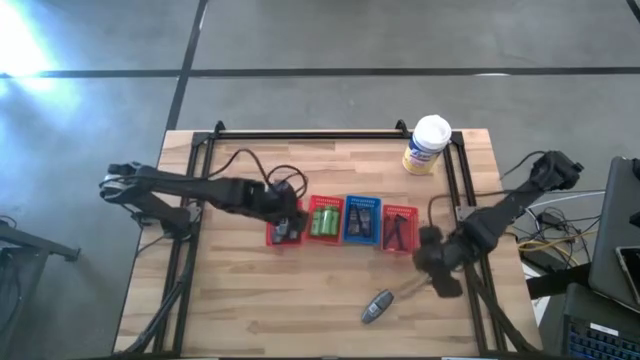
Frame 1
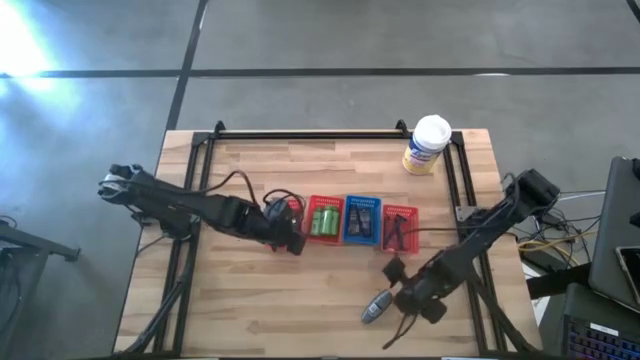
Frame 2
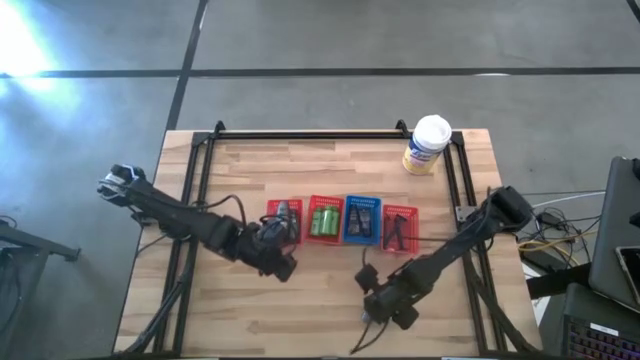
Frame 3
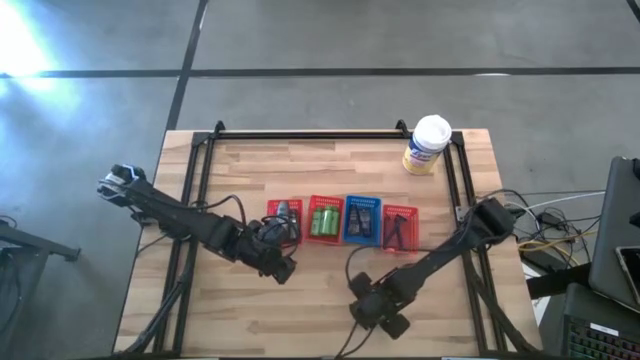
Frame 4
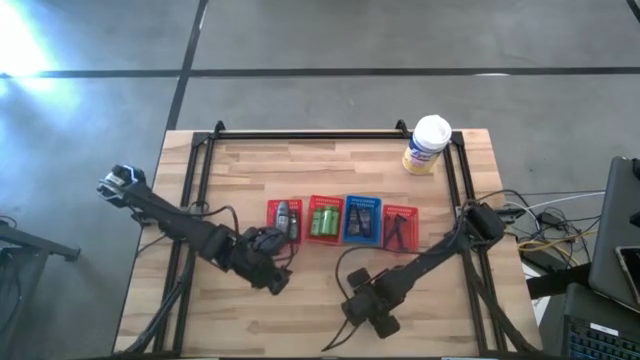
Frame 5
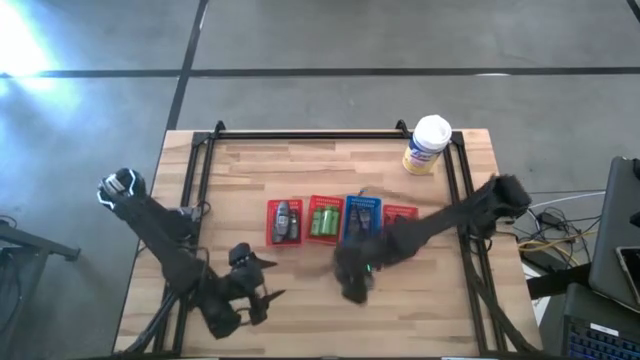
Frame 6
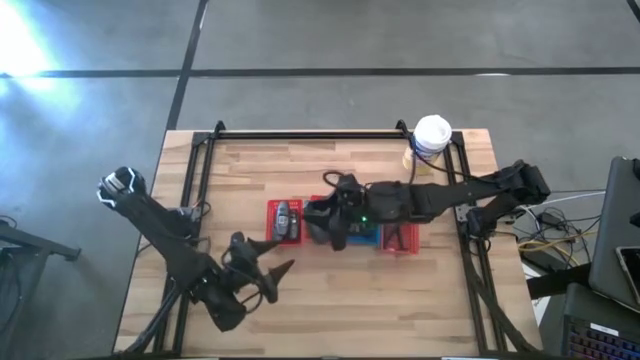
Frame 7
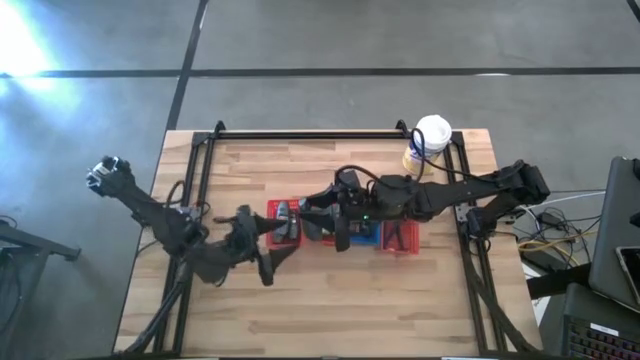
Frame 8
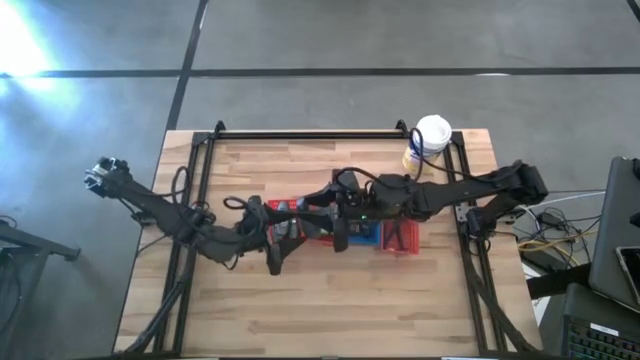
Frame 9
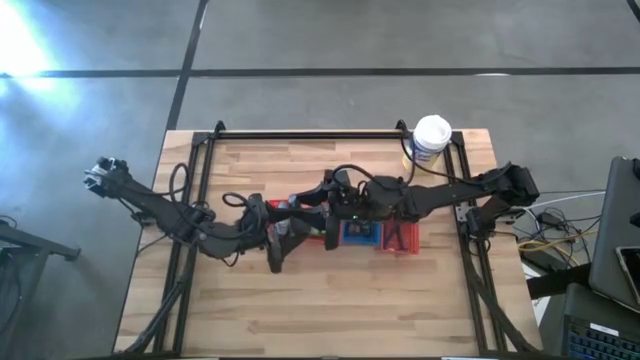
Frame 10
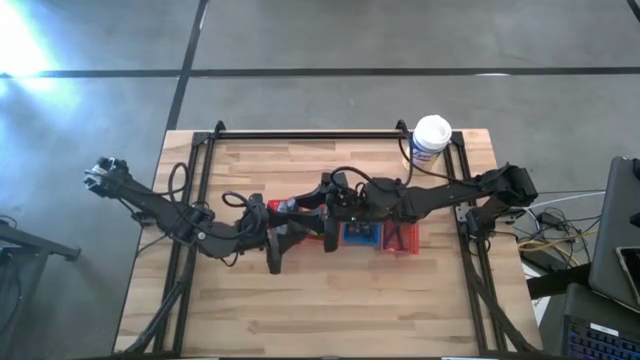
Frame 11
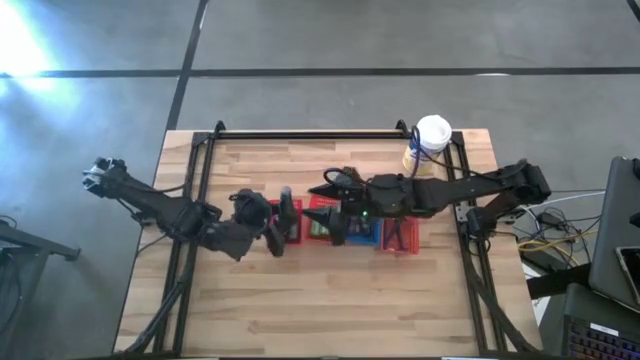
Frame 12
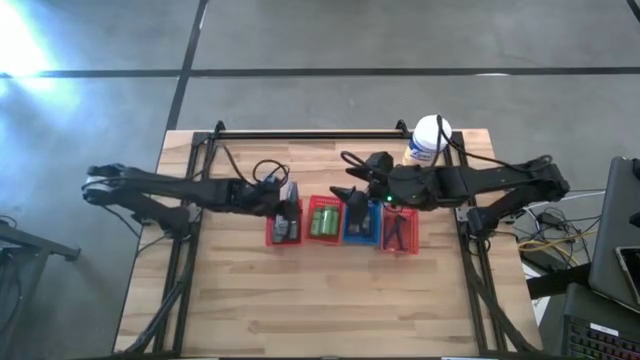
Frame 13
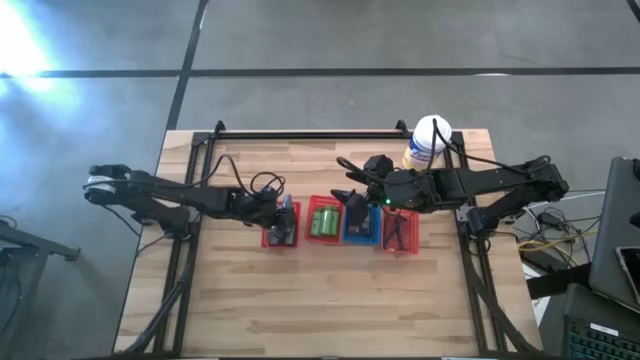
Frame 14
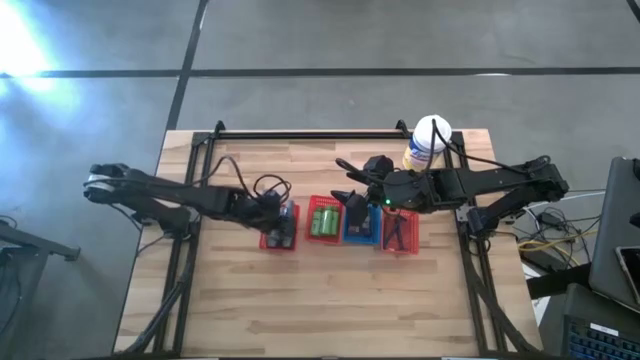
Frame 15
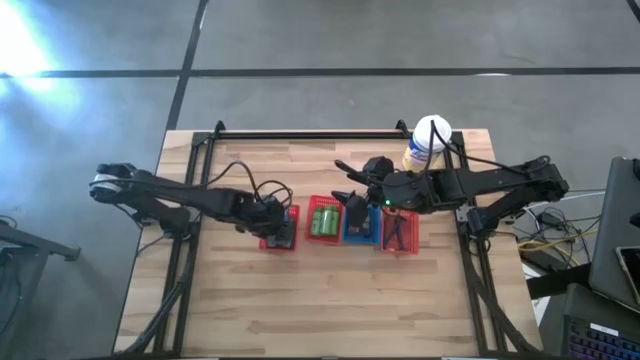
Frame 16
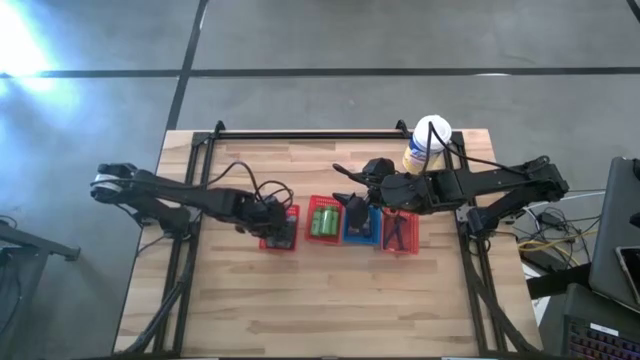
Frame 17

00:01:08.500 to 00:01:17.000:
Task: Pick & Place Travel size toiletries
Put the gray deodorant into the left orange basket

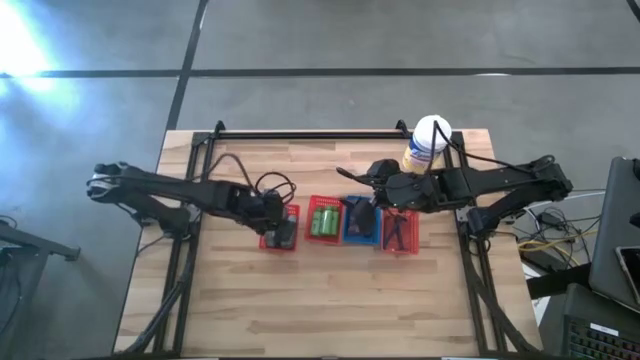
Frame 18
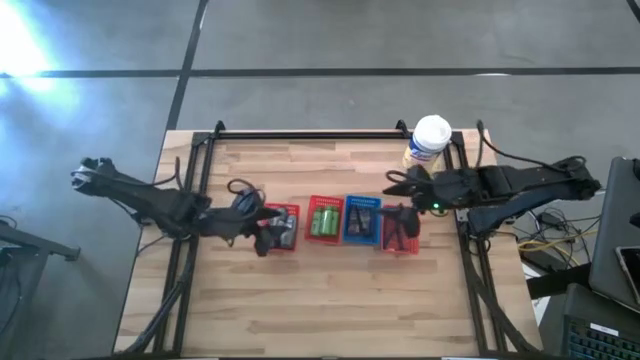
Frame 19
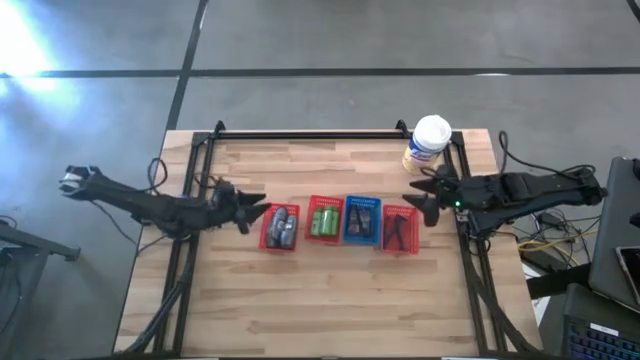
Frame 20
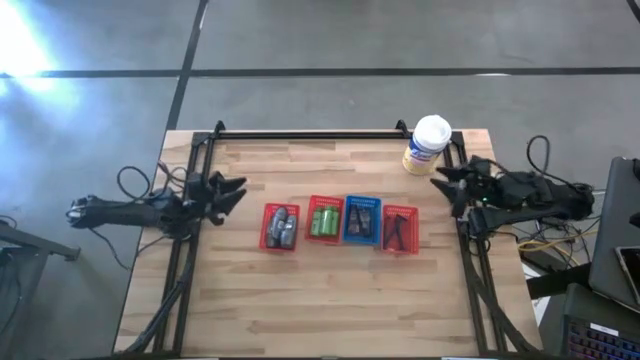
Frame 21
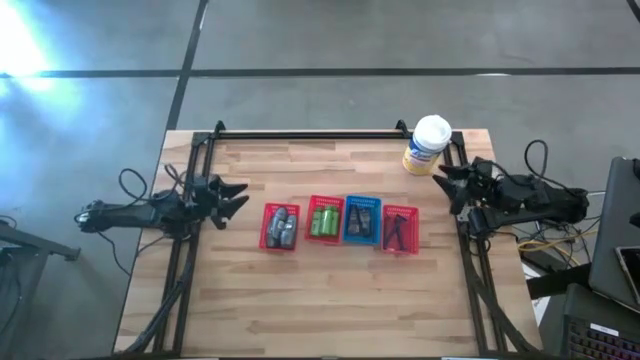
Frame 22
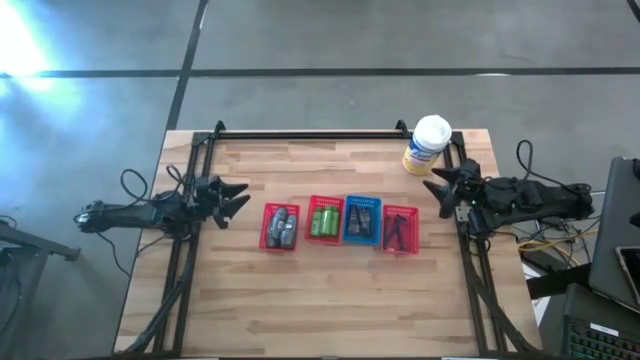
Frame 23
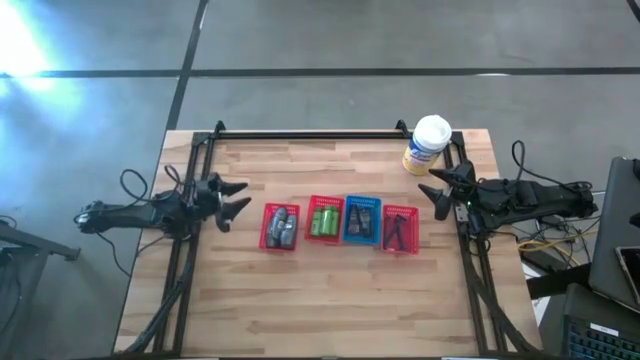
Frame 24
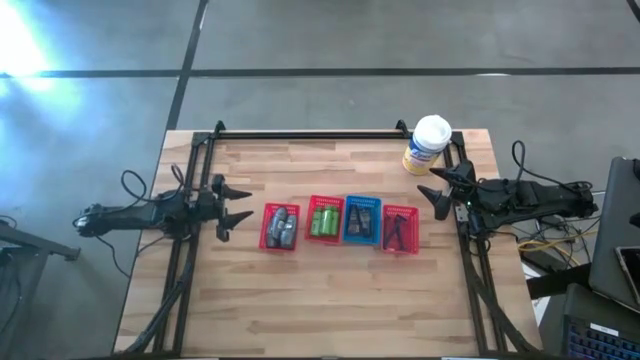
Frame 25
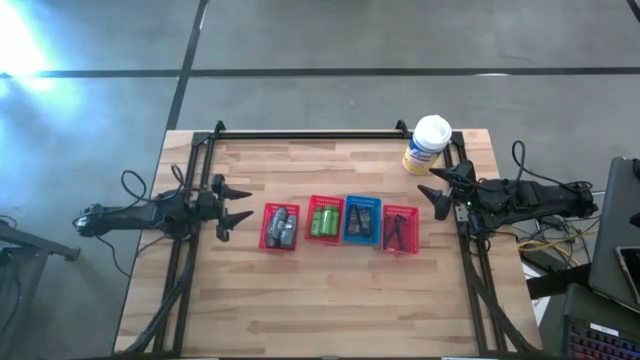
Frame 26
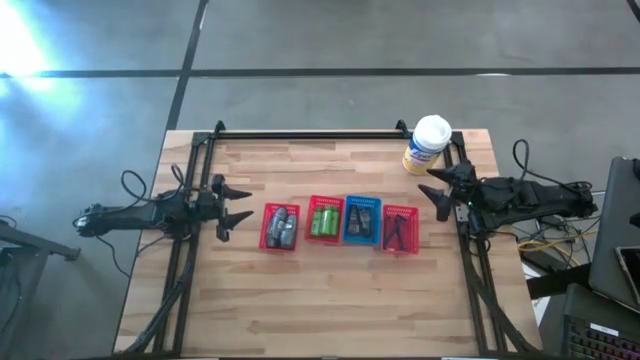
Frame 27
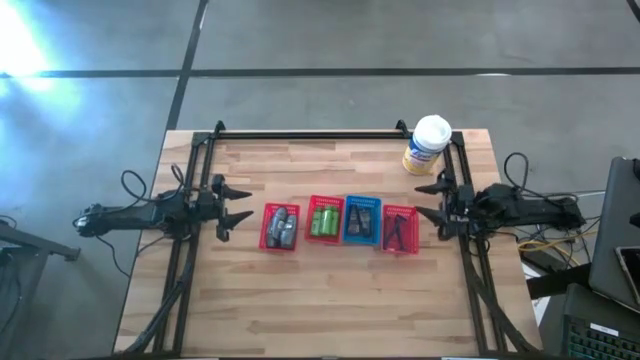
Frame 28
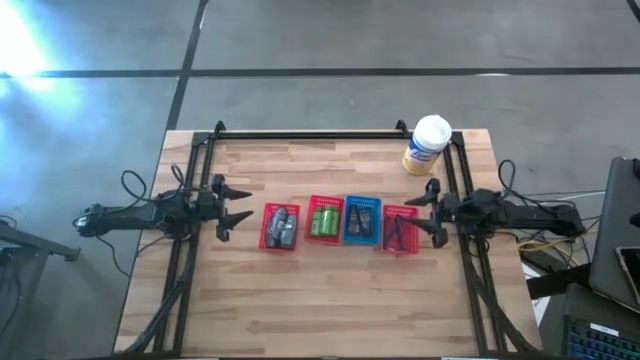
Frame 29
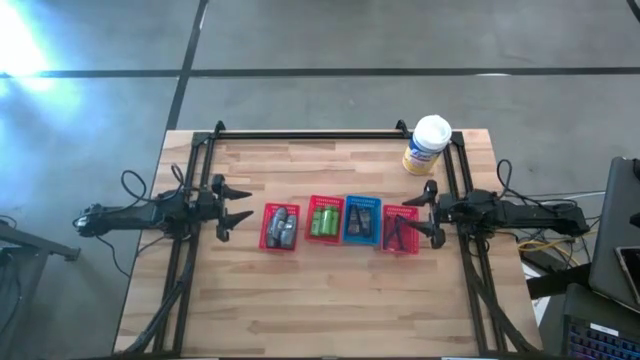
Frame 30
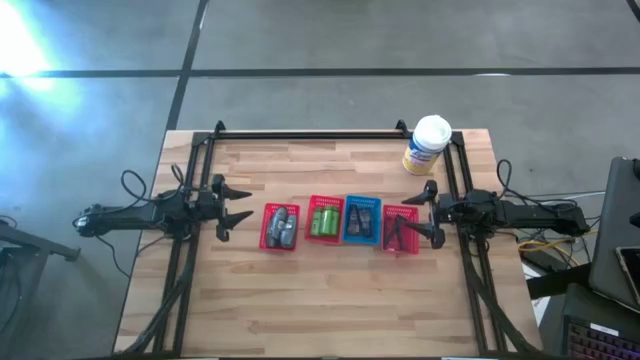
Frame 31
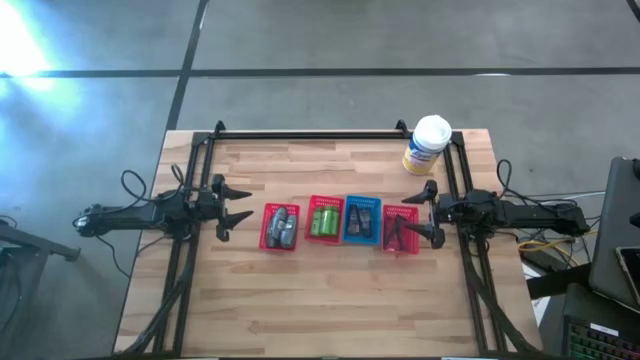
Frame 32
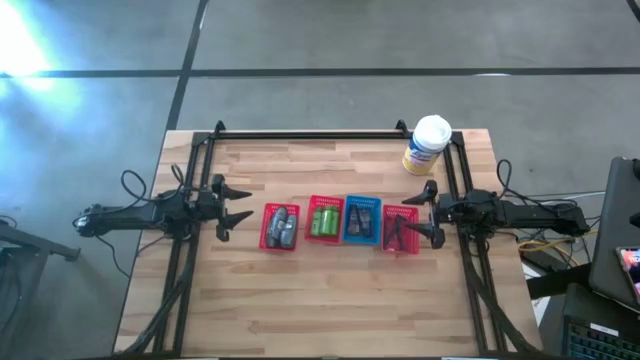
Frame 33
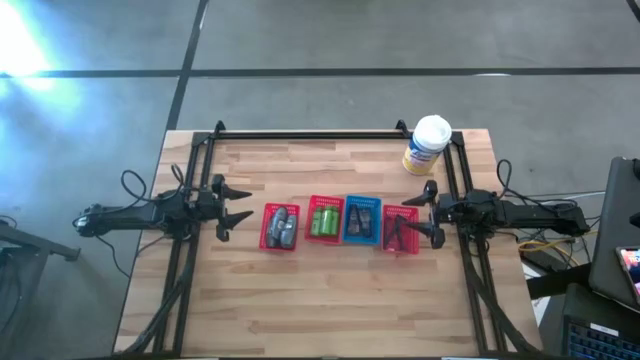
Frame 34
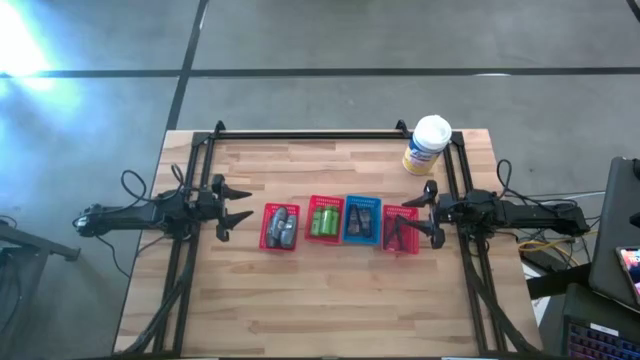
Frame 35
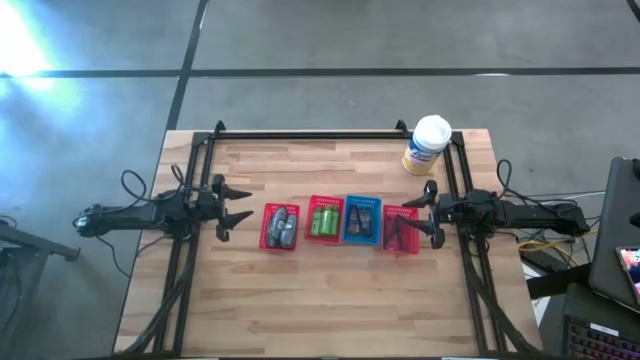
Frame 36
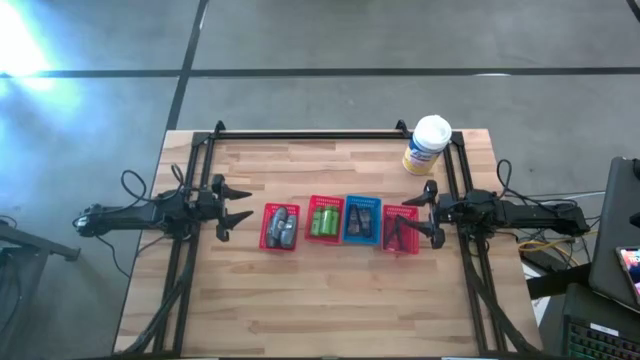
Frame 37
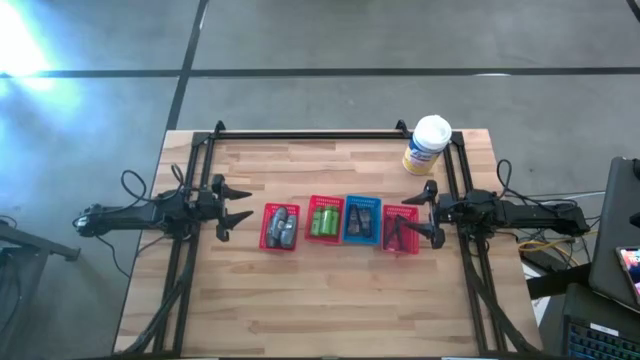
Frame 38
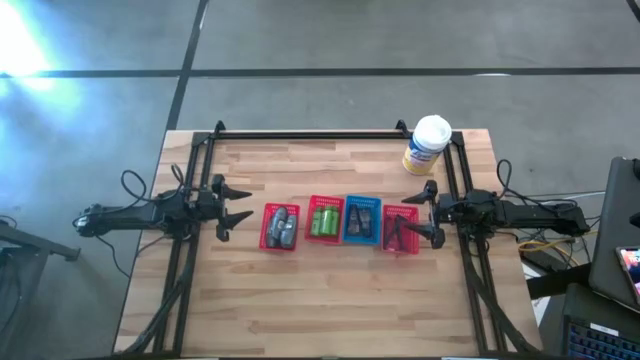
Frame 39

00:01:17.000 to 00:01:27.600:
Return to Home Position

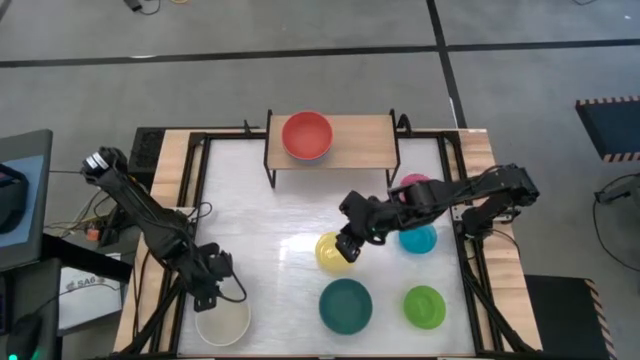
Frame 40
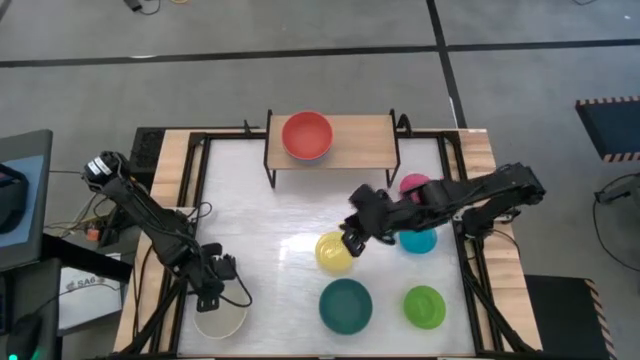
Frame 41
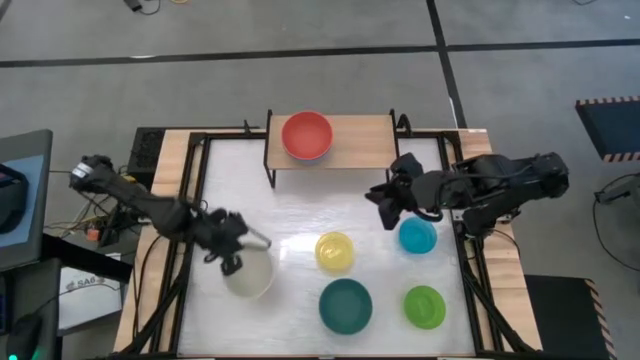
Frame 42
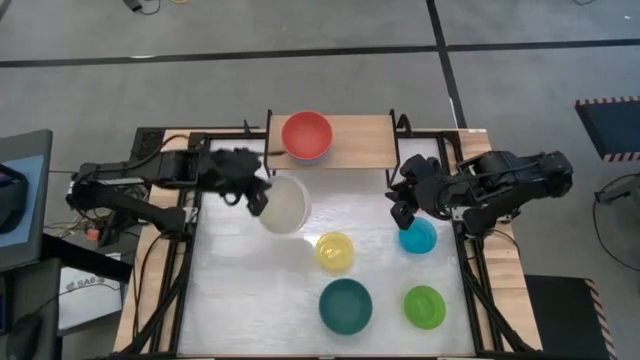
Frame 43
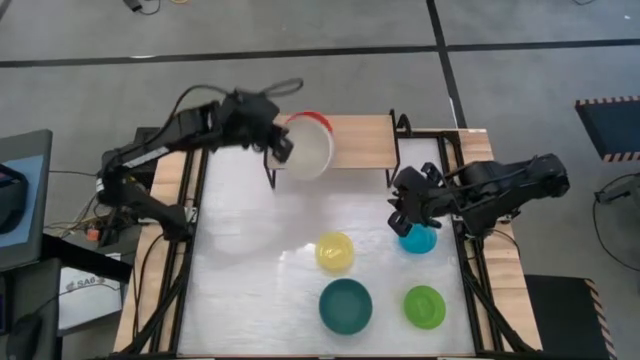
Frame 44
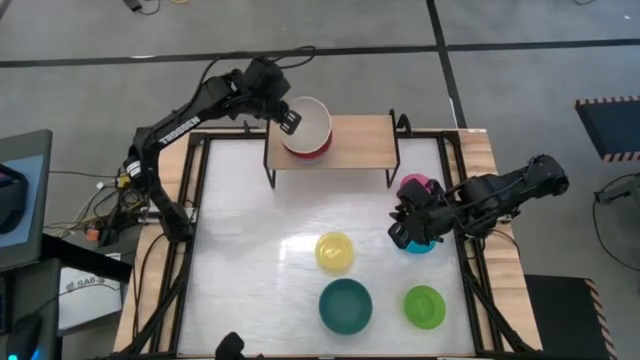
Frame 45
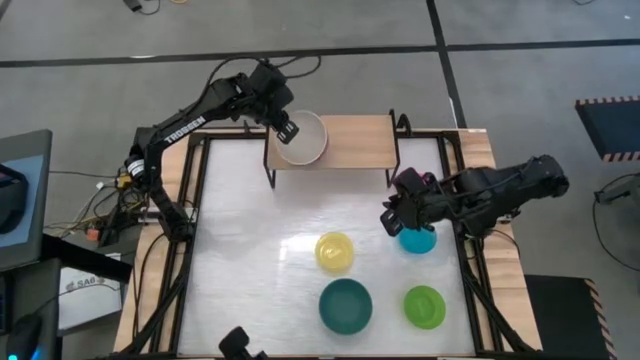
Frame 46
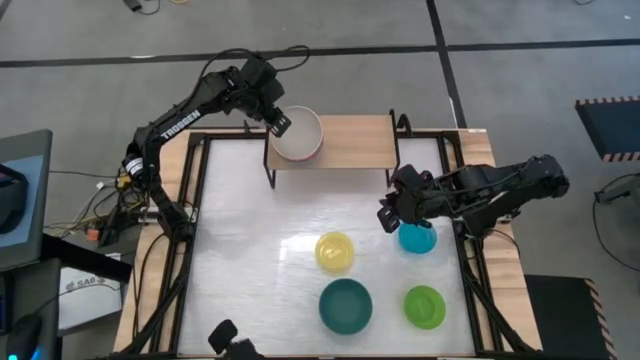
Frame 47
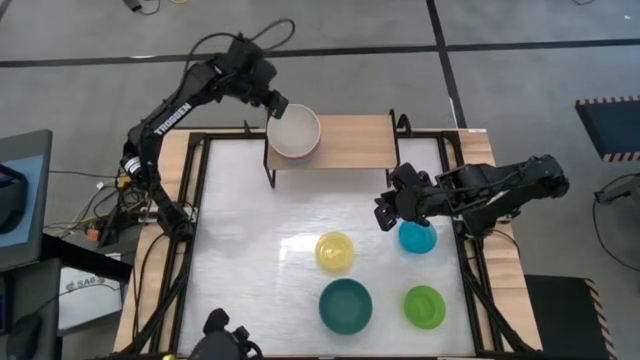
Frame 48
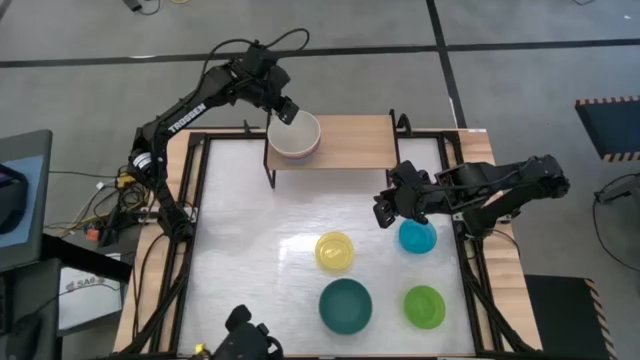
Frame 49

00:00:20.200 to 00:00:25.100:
Task: Place and stack bowls onto a shelf
Stack the white bowl on top of the orange bowl on the shelf
